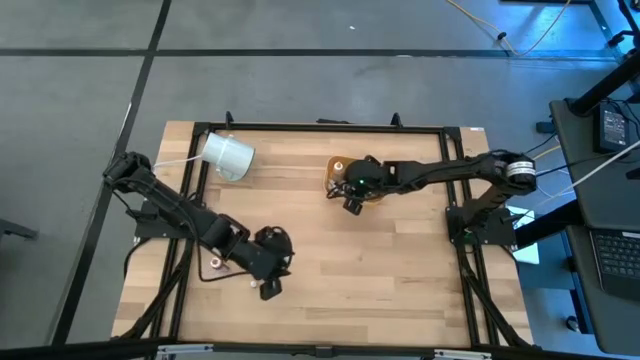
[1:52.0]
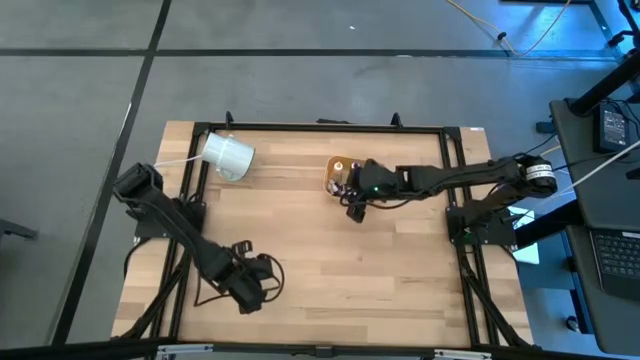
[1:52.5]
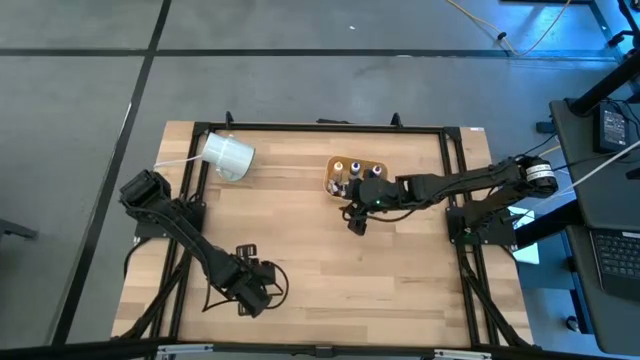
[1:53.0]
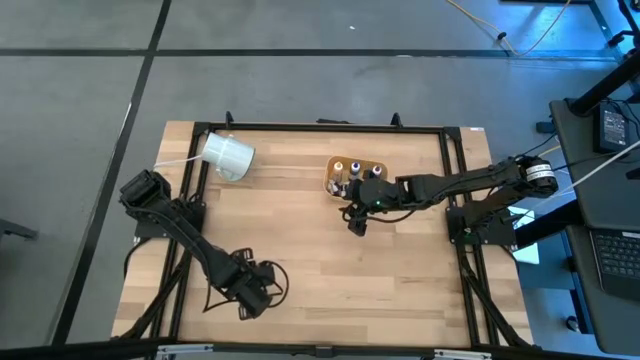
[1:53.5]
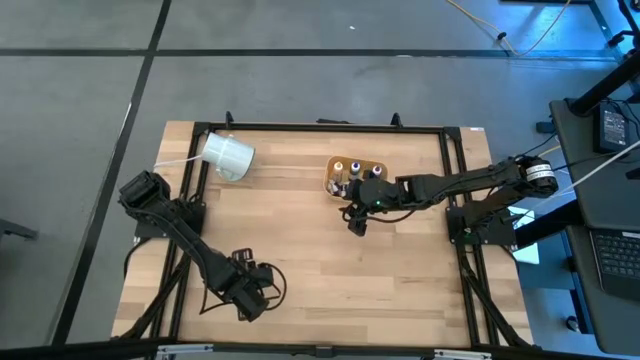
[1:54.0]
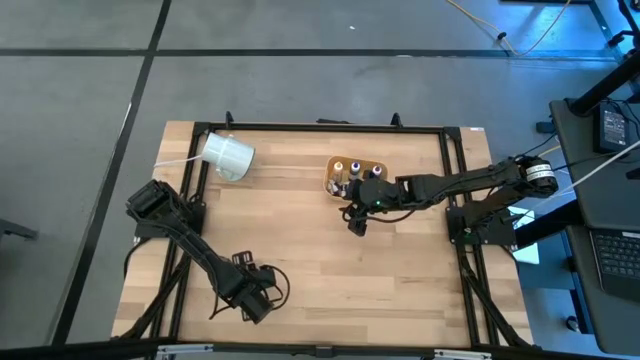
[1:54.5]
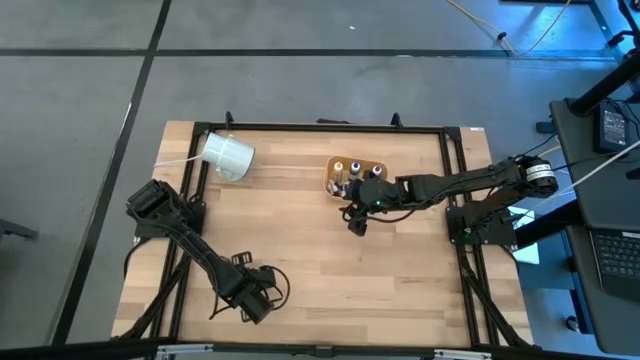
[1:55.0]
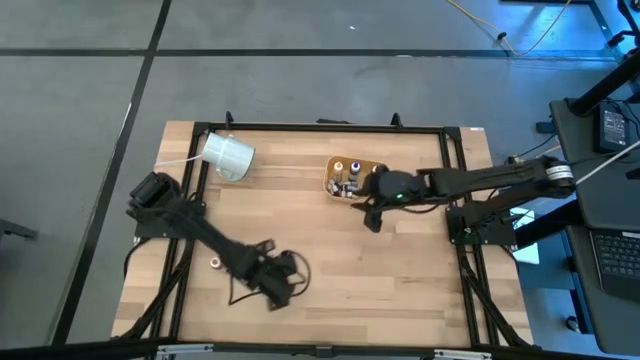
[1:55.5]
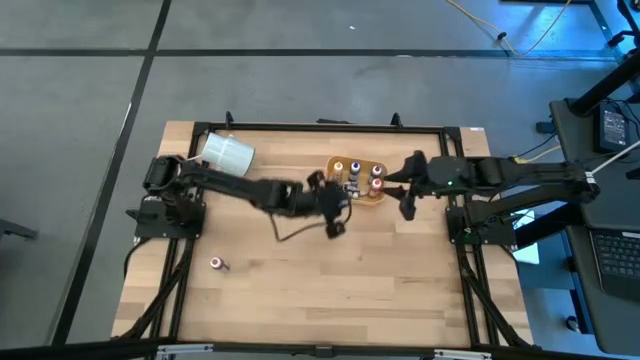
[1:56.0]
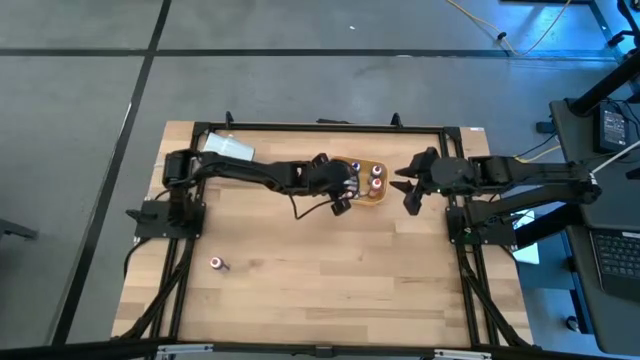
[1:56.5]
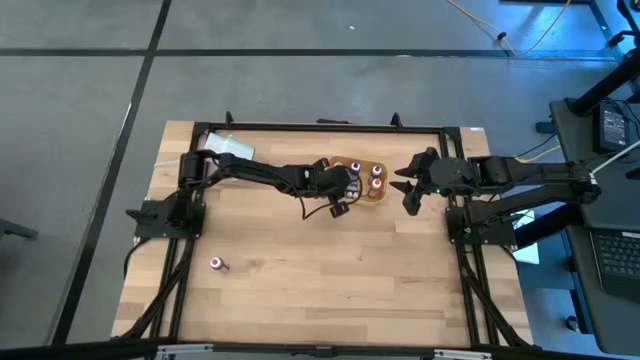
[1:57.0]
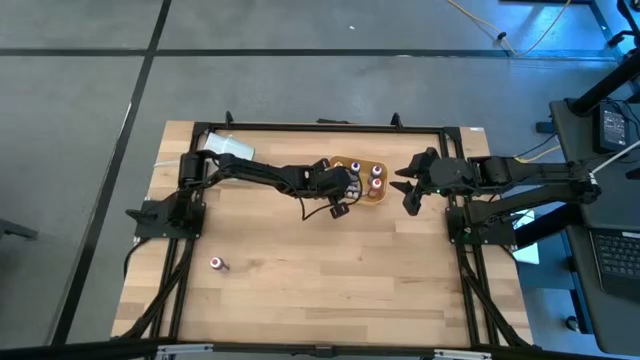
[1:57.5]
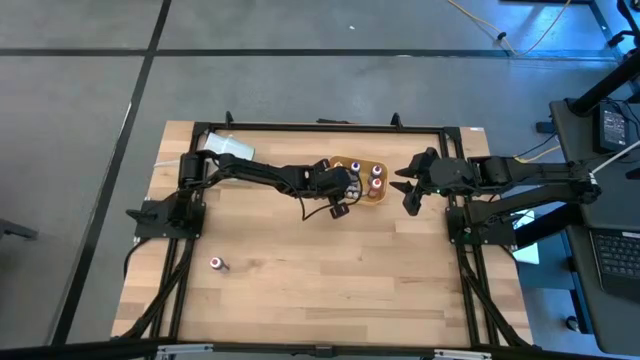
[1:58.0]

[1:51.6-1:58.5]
Task: Pick & Place food coloring
Put the small black food coloring bottle into the yellow bin

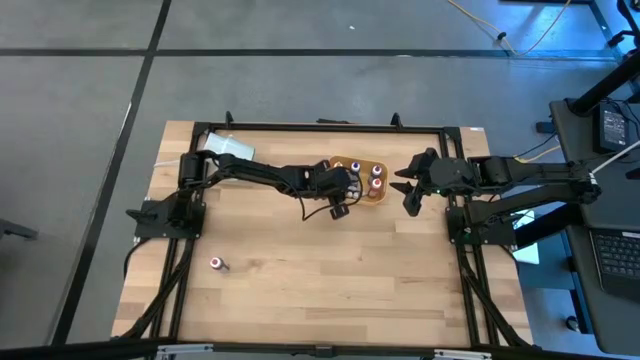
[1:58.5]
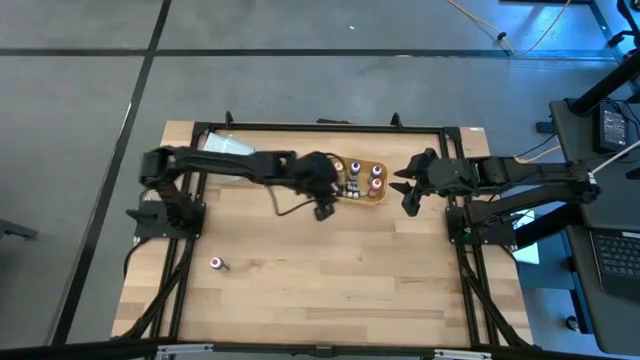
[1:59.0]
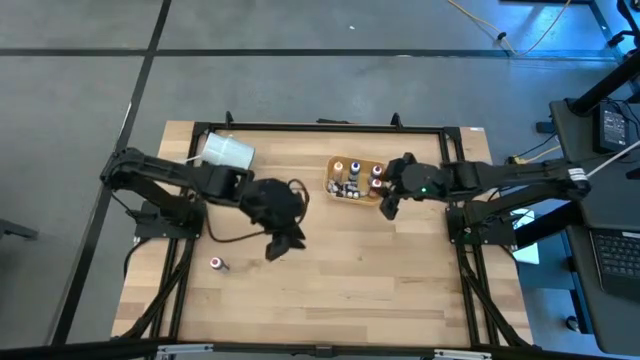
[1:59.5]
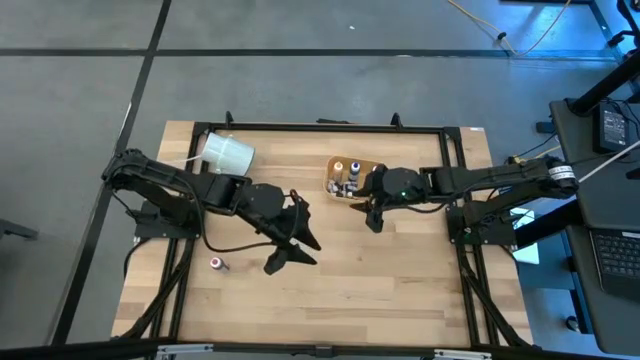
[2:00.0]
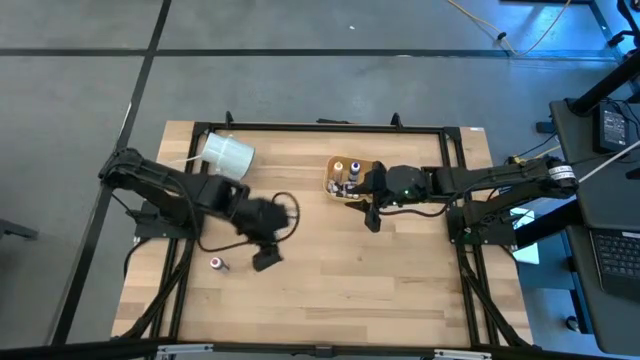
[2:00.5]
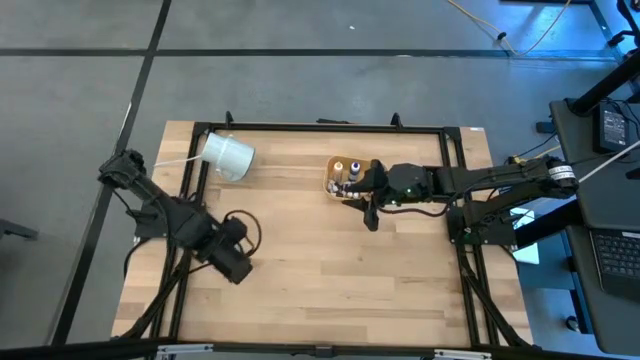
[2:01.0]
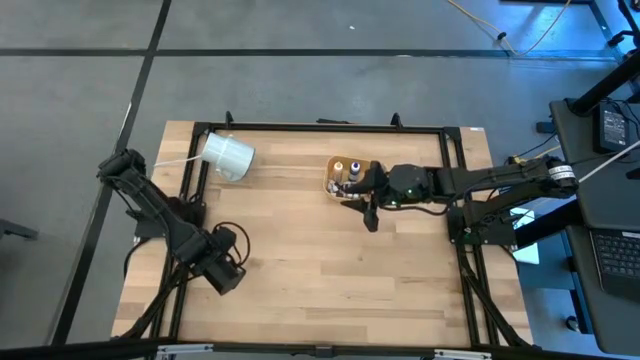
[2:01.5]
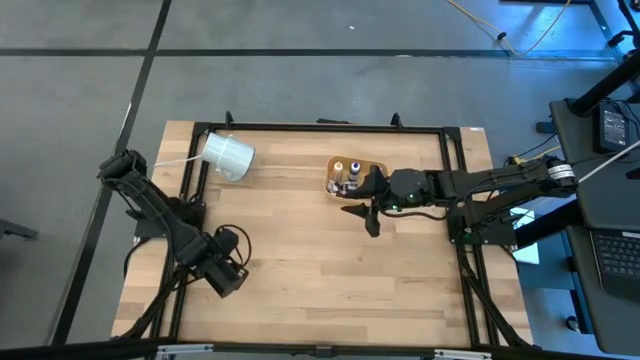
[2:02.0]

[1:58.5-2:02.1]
Put the large pink food coloring bottles into the yellow bin

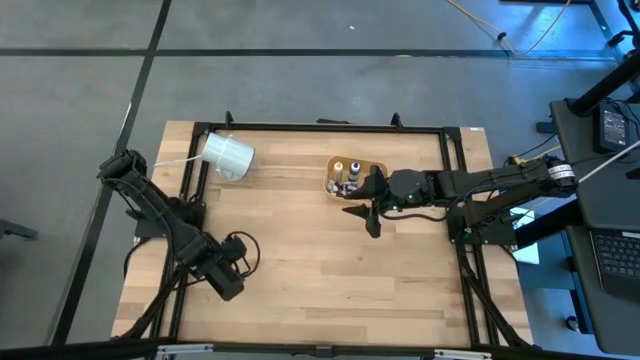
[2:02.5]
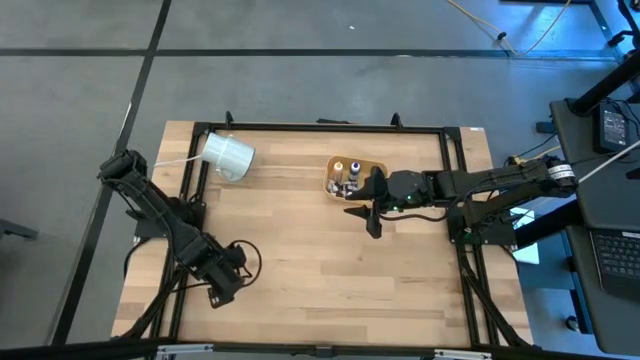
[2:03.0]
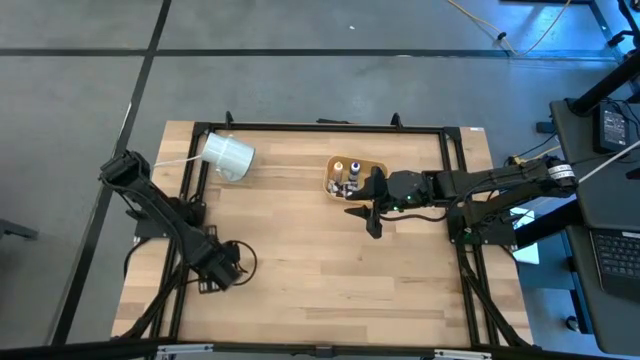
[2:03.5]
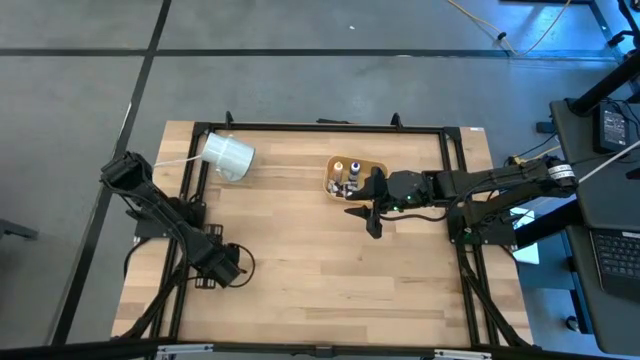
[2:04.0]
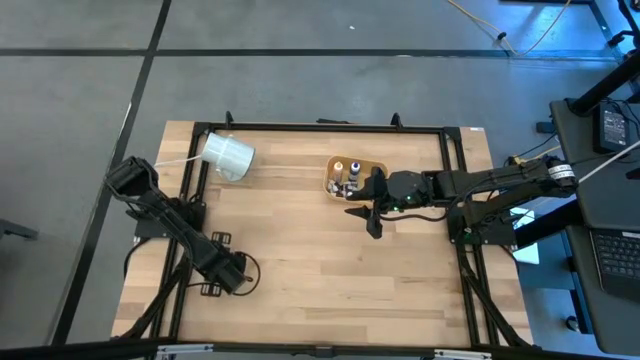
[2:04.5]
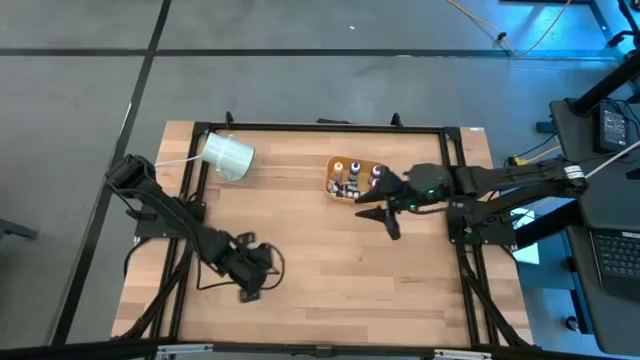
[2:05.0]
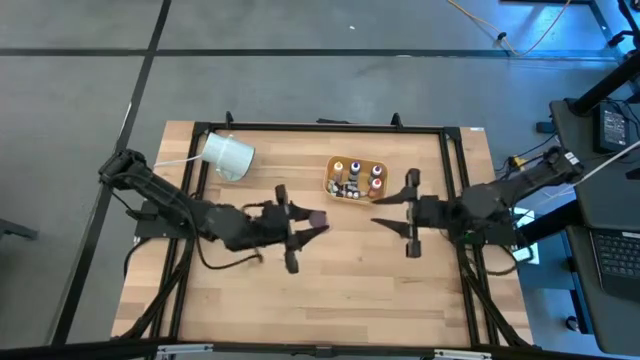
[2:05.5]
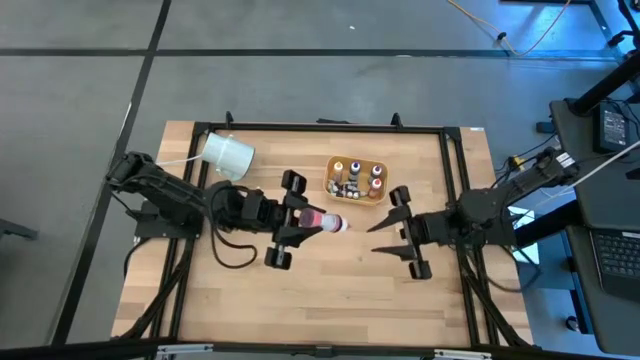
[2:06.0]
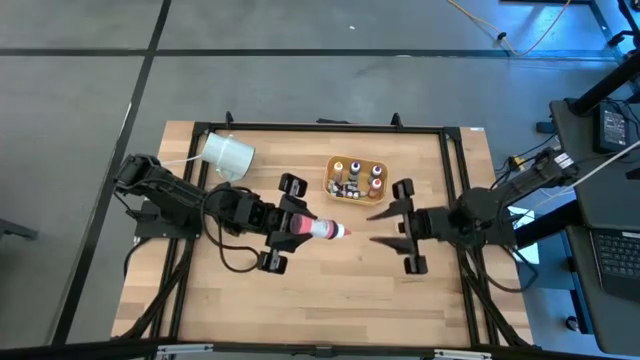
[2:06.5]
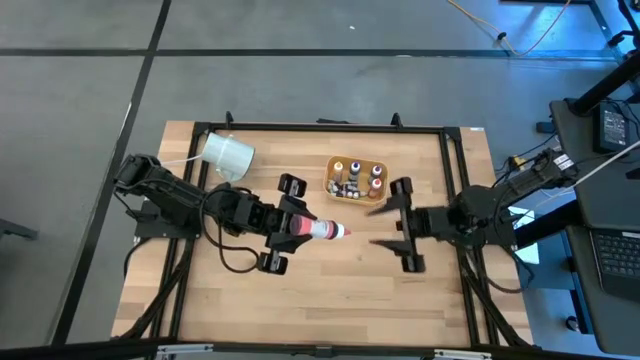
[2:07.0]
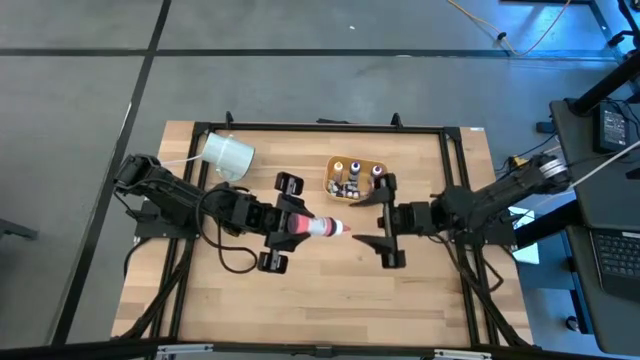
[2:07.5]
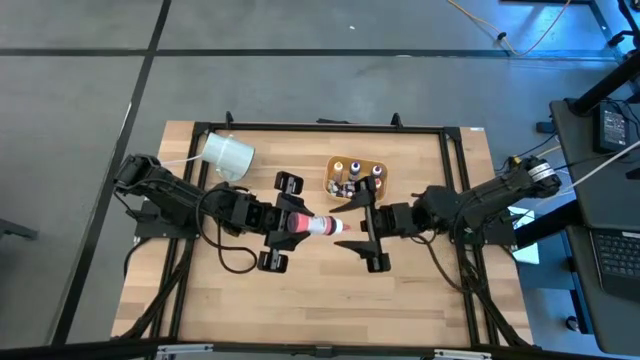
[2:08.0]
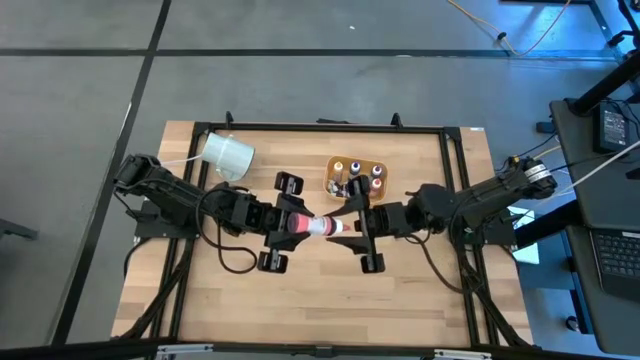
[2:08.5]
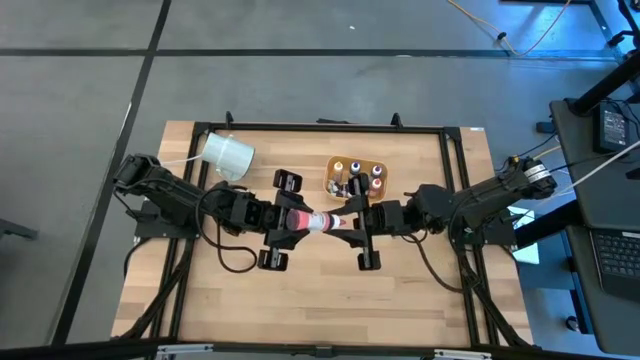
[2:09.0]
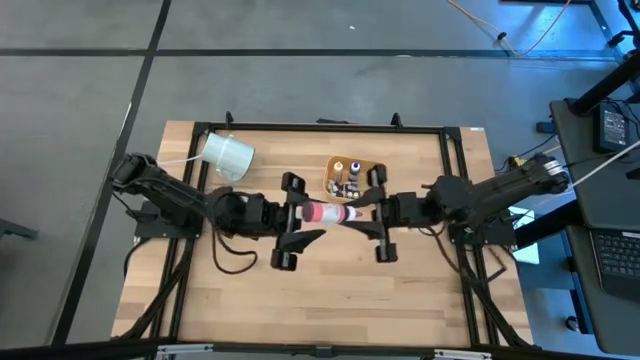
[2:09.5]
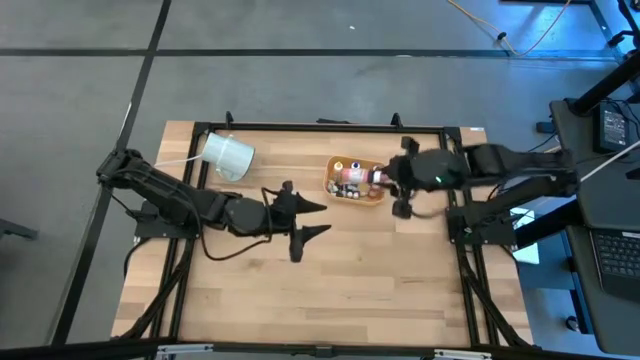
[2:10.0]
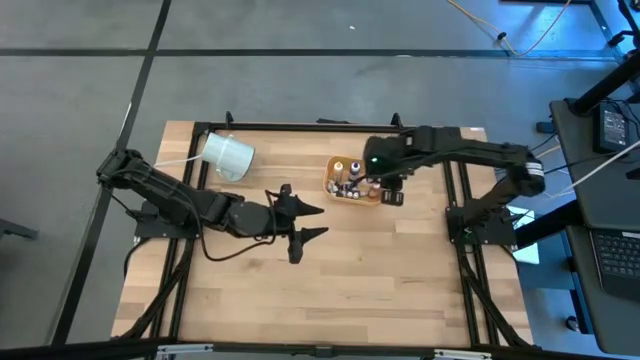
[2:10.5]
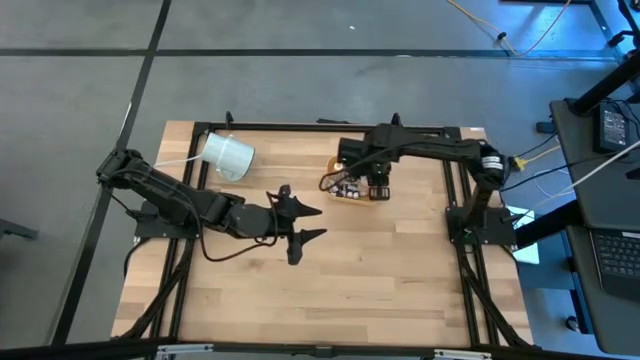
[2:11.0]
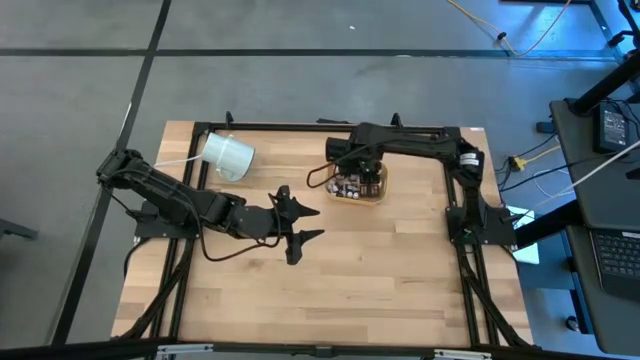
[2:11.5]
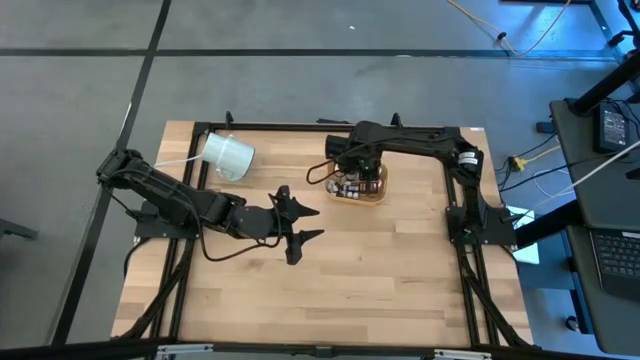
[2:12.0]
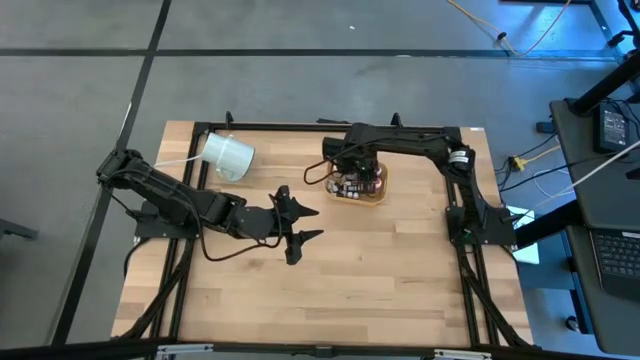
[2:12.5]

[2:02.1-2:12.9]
Put the large pink food coloring bottles into the yellow bin
